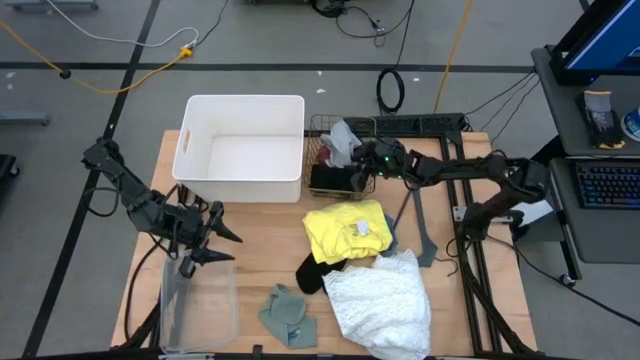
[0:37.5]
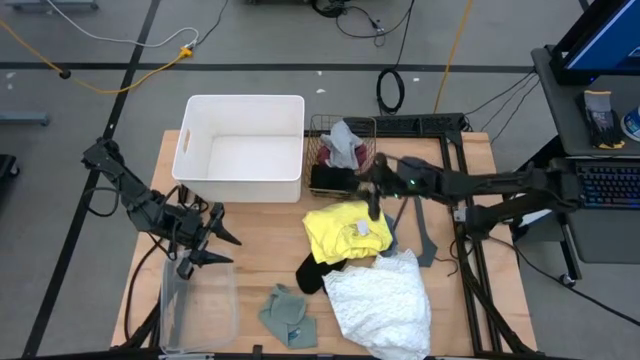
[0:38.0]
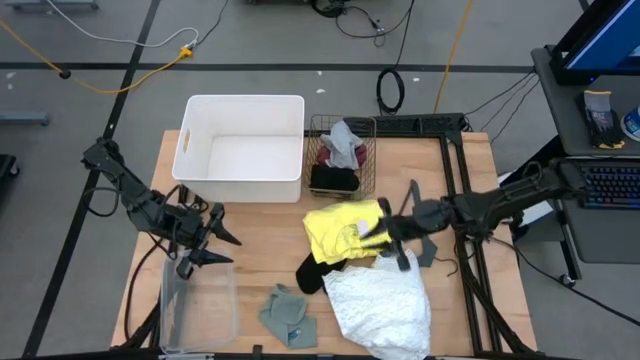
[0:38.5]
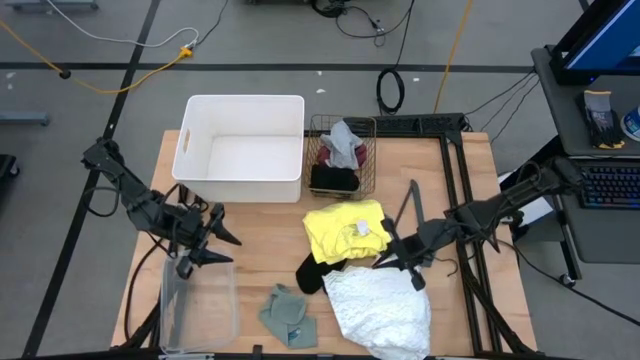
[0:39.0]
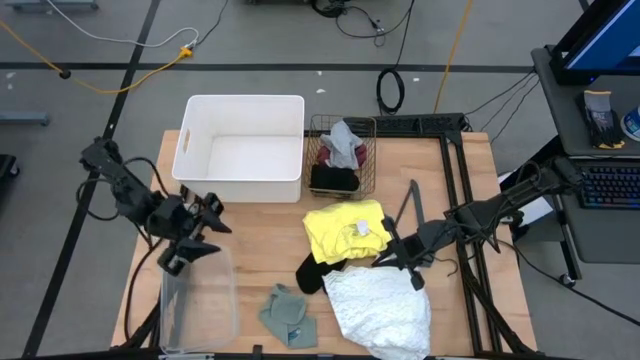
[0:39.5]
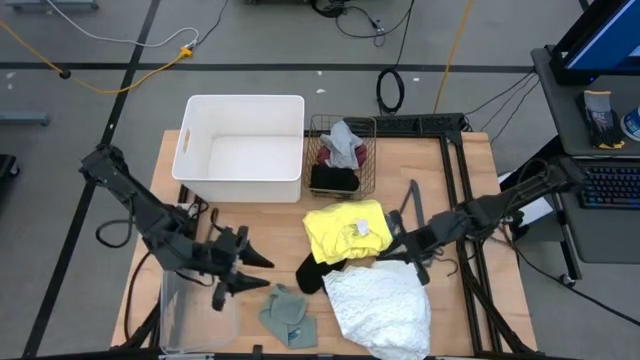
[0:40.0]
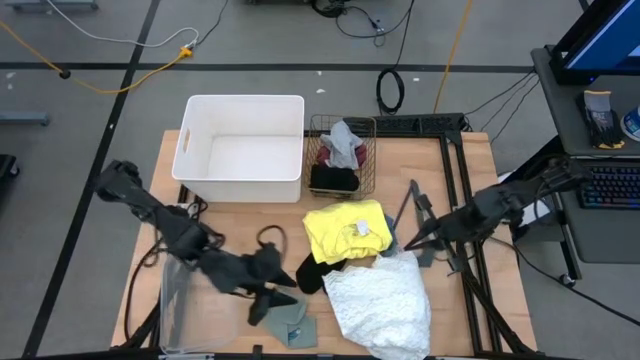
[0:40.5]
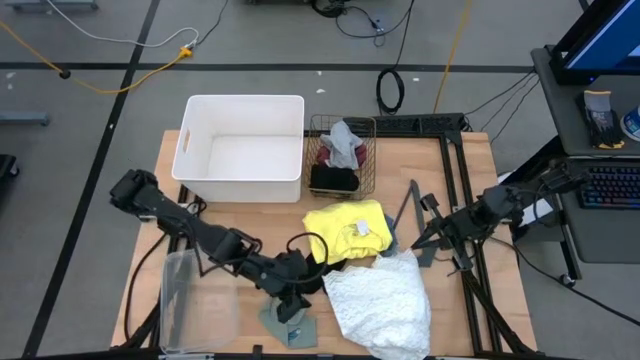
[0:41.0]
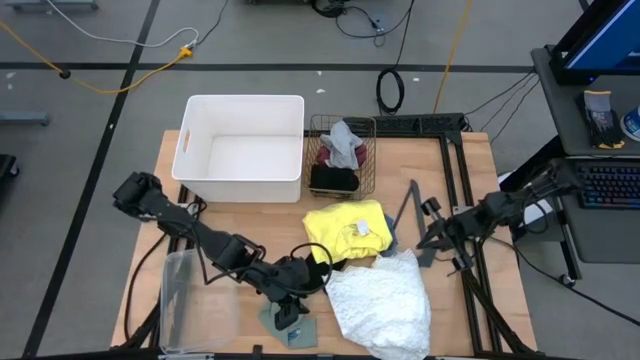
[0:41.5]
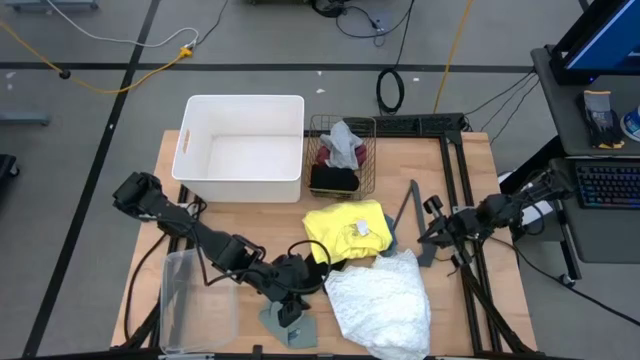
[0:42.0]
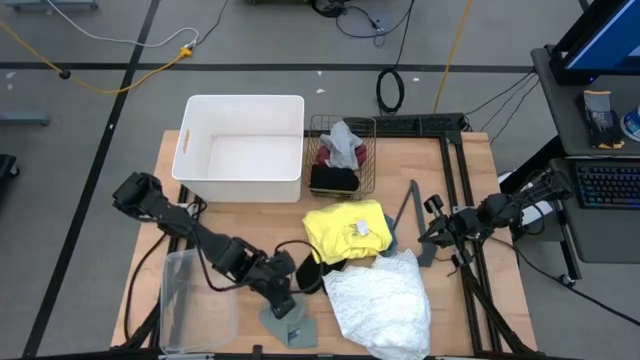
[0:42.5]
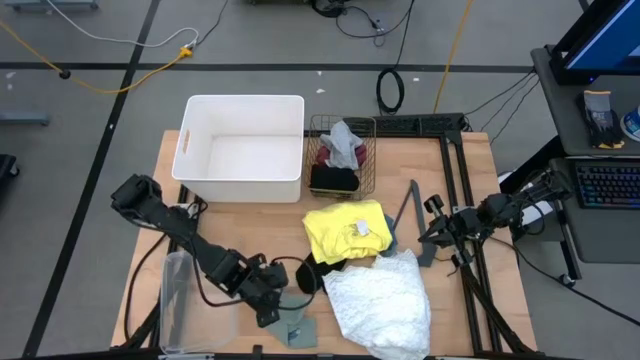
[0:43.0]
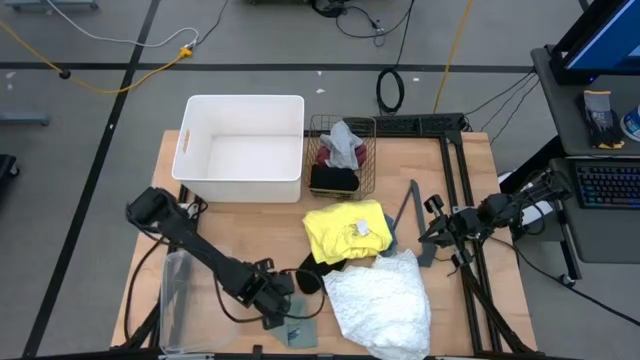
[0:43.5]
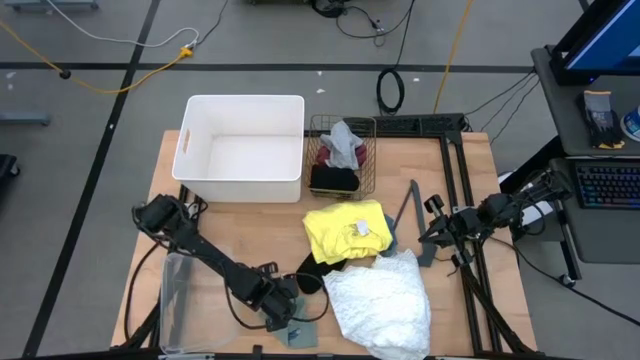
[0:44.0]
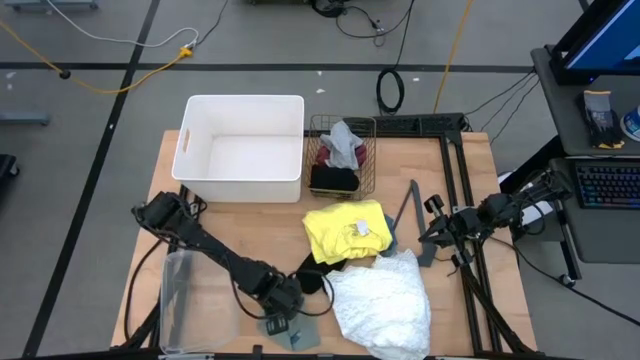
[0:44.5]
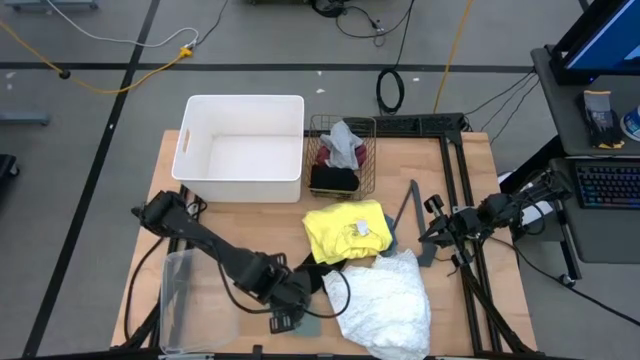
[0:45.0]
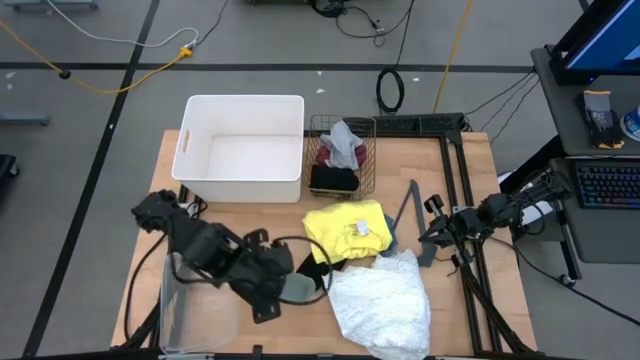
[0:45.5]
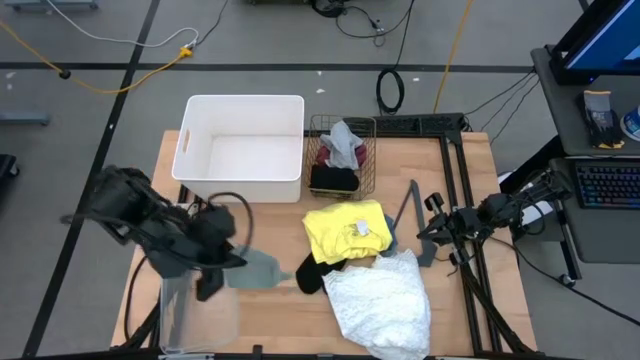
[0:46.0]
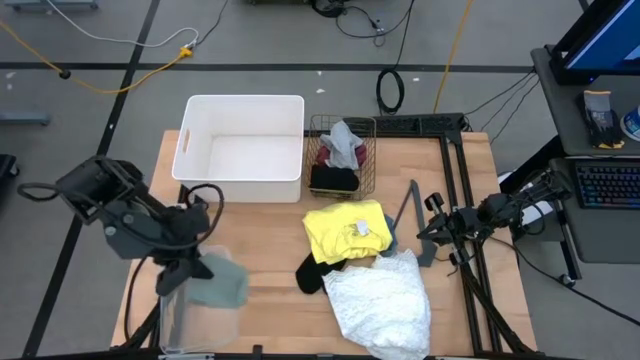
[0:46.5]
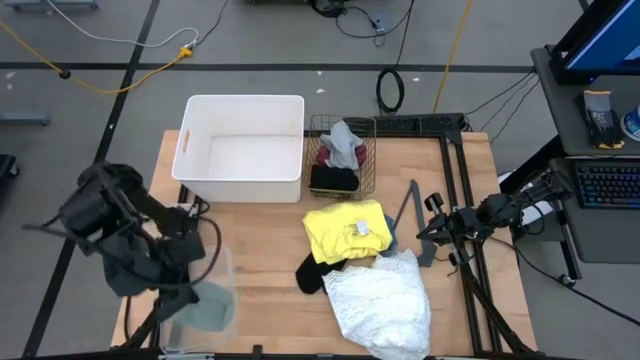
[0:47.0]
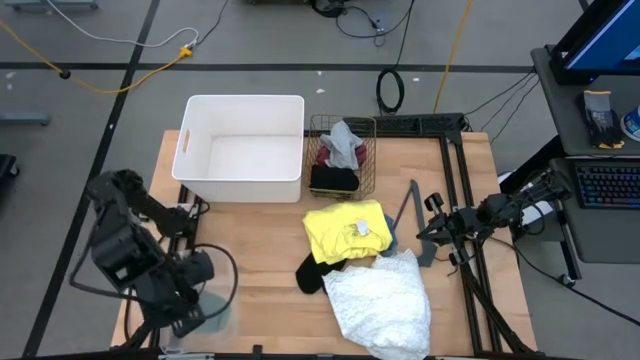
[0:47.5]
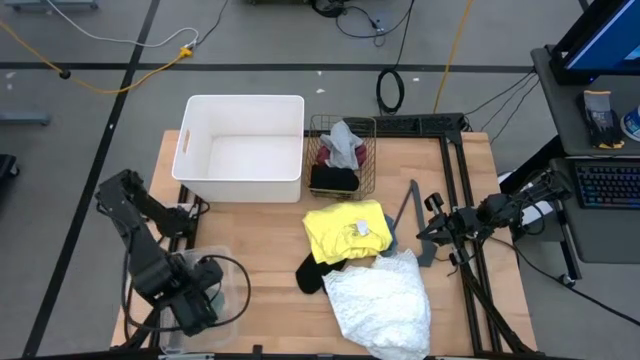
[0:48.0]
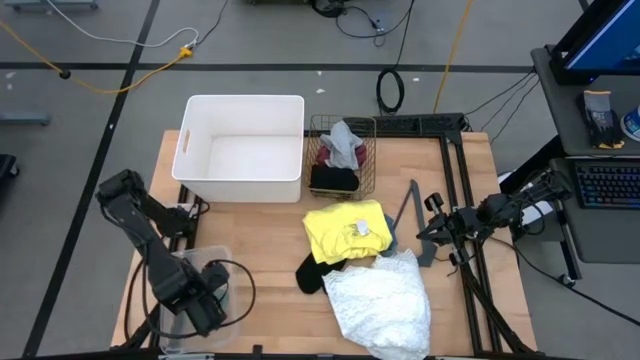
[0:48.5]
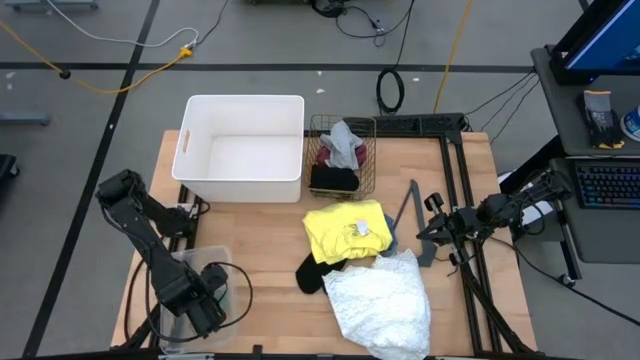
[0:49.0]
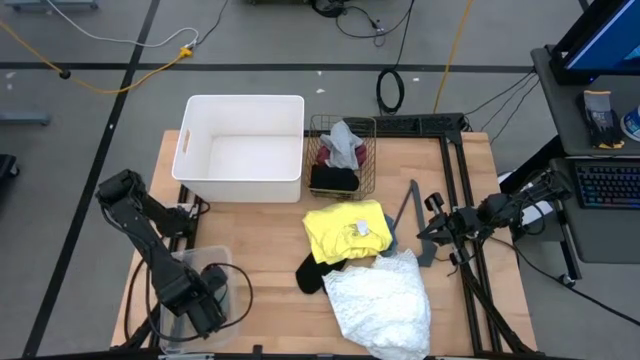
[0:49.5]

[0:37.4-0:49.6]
Task: Pick & Place Cloths
Put the gray sock into the transparent bin

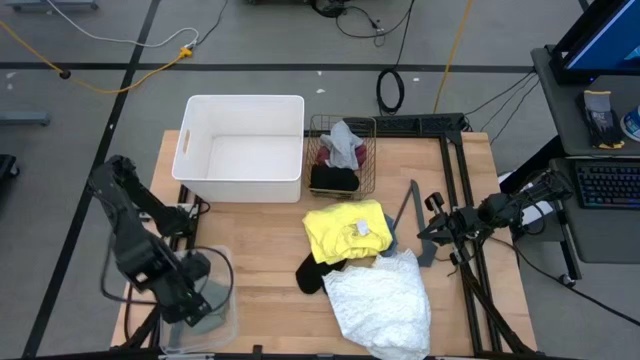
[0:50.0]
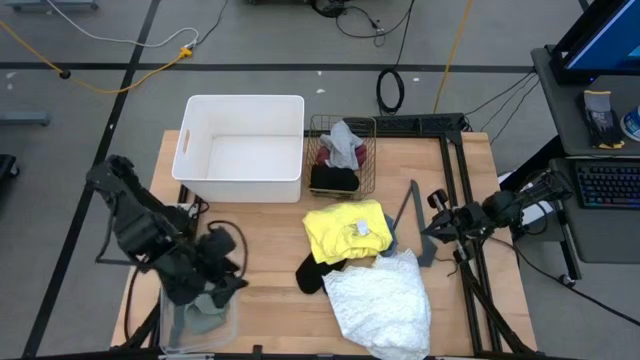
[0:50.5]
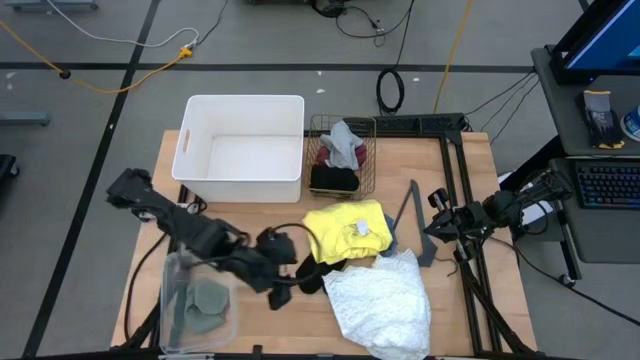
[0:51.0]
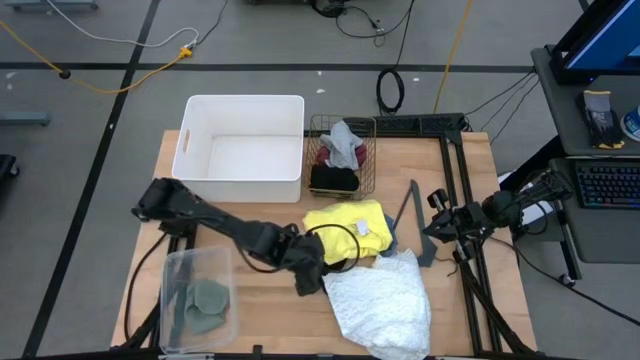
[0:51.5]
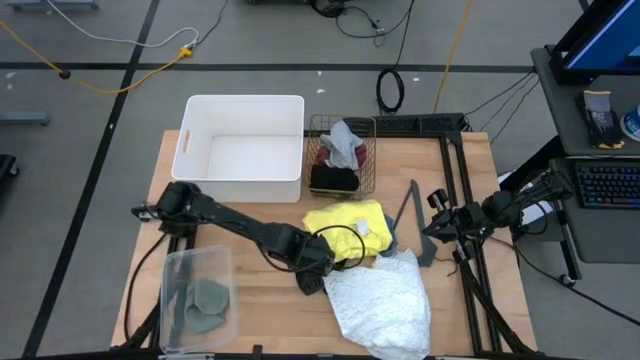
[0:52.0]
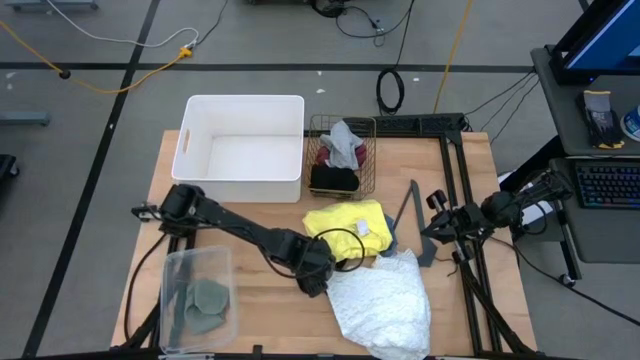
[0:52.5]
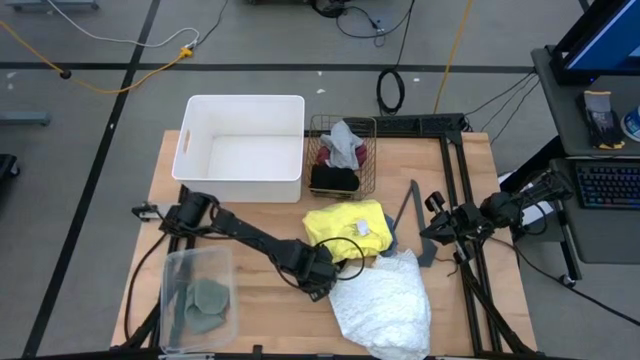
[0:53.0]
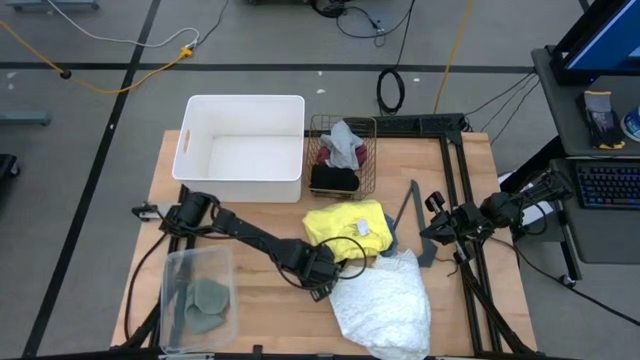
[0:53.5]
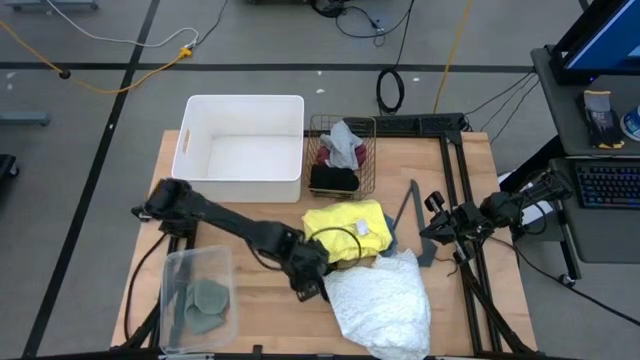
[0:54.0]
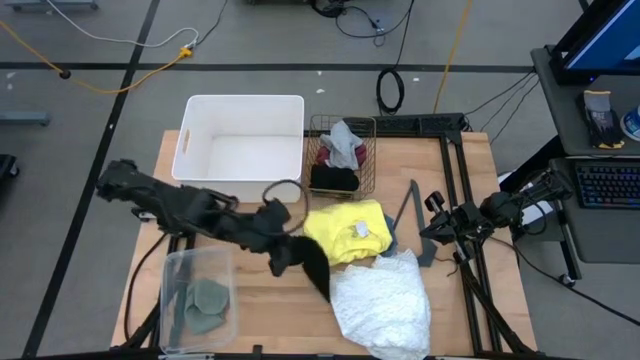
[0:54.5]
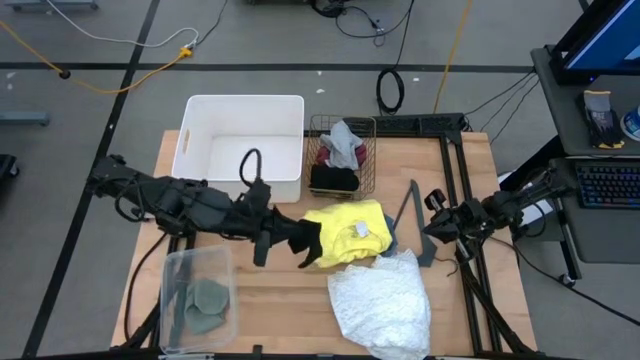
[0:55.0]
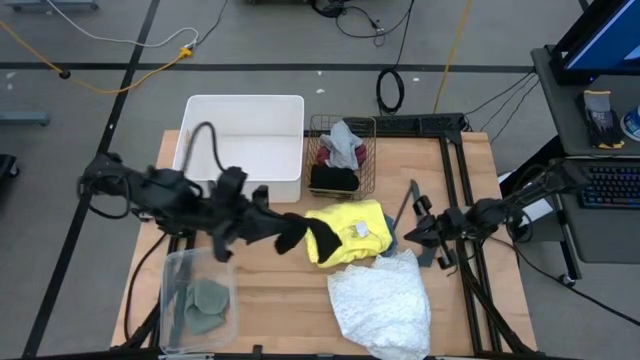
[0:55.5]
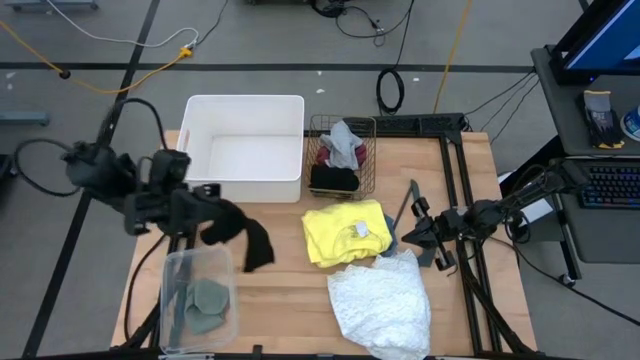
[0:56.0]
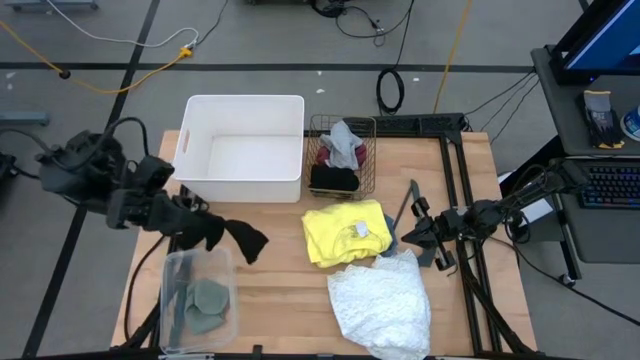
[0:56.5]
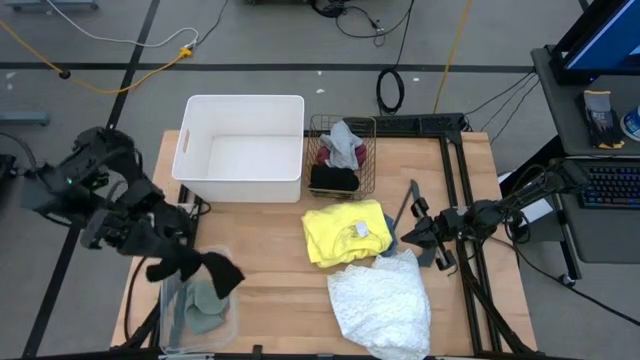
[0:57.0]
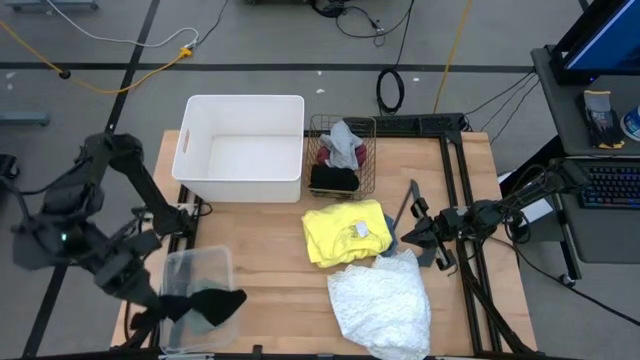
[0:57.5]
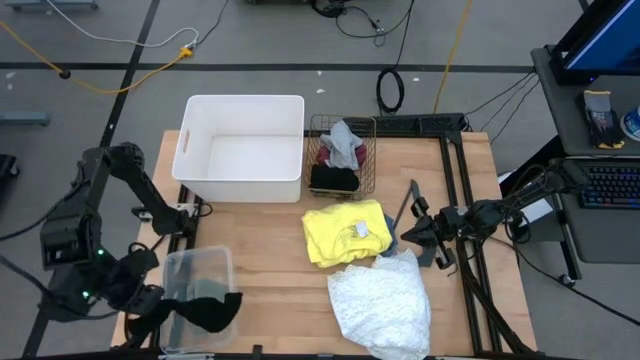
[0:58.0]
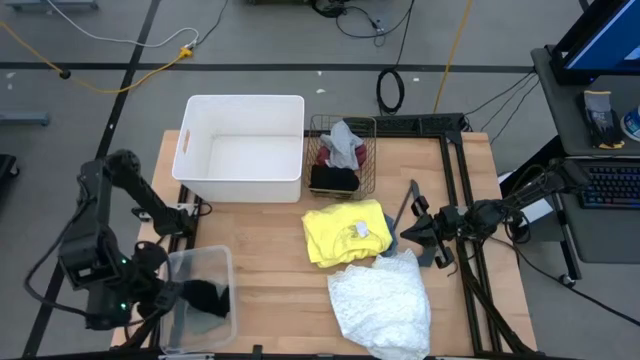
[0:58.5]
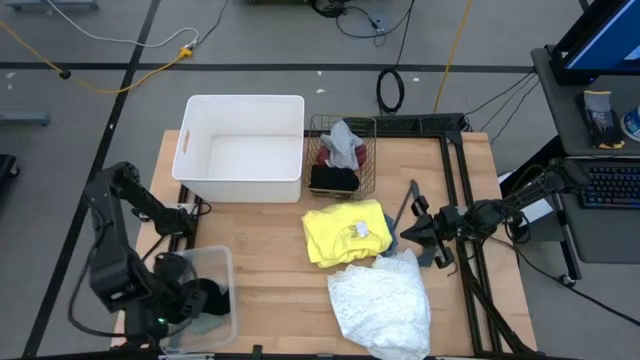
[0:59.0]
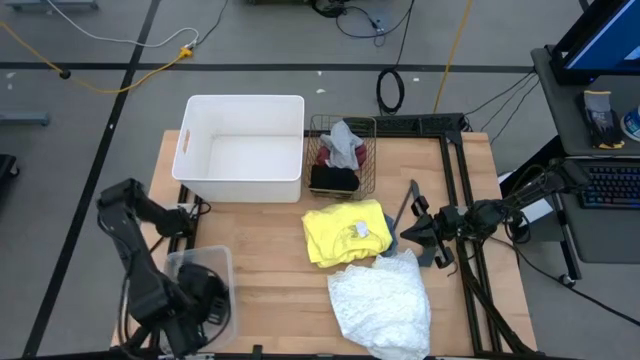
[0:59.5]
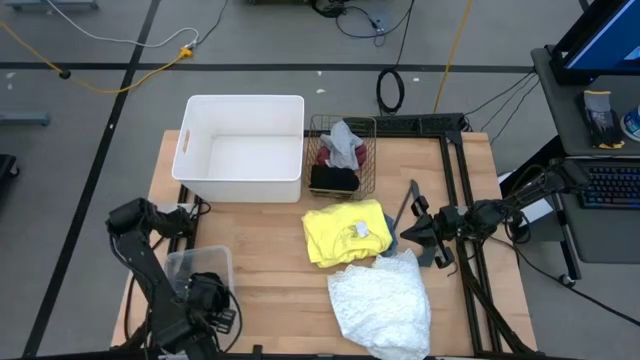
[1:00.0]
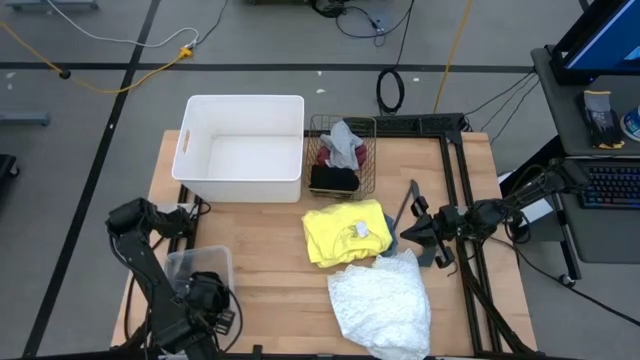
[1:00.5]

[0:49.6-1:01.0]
Put the black sock into the transparent bin
